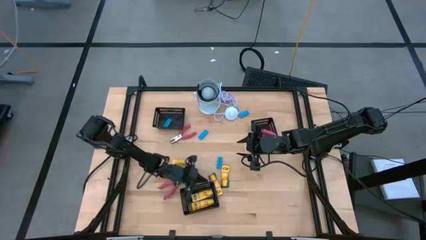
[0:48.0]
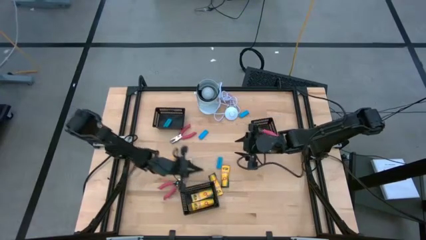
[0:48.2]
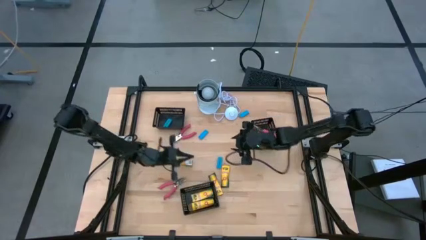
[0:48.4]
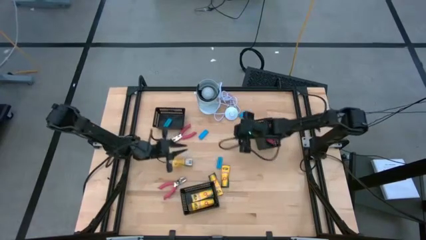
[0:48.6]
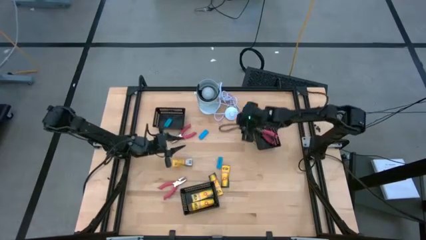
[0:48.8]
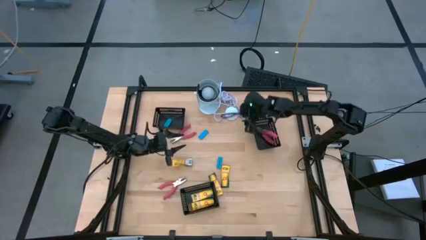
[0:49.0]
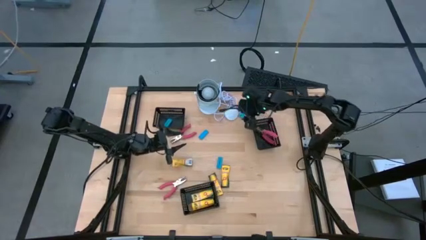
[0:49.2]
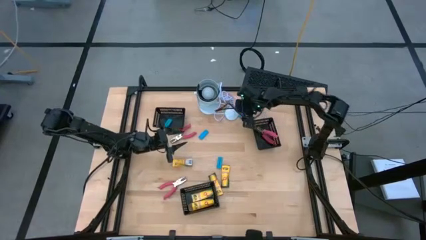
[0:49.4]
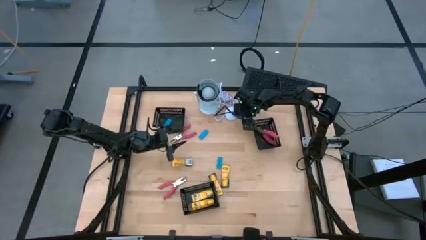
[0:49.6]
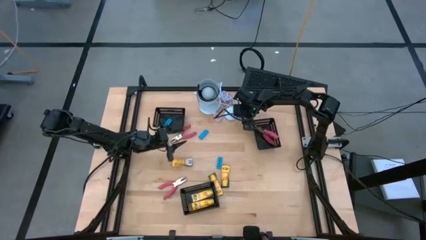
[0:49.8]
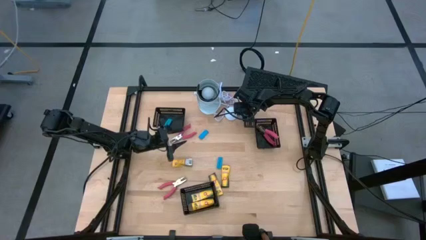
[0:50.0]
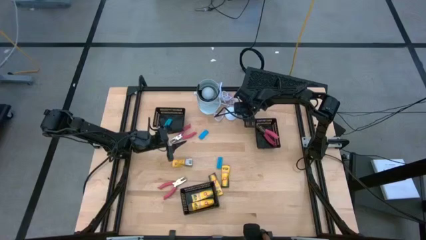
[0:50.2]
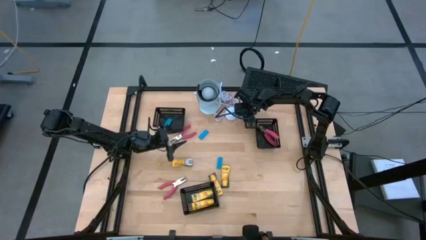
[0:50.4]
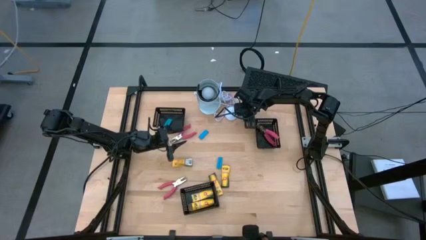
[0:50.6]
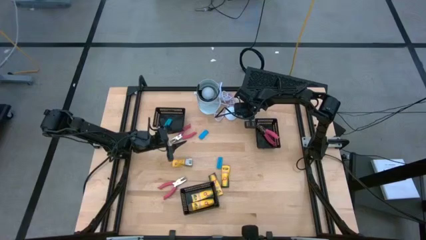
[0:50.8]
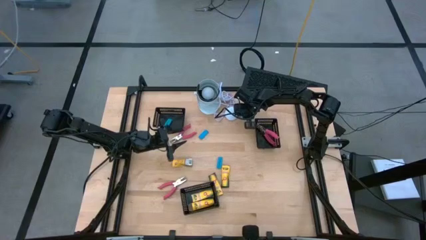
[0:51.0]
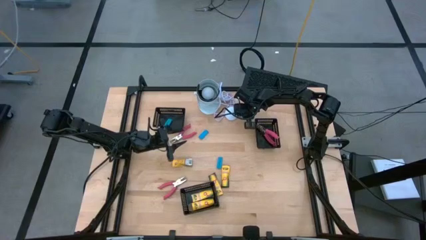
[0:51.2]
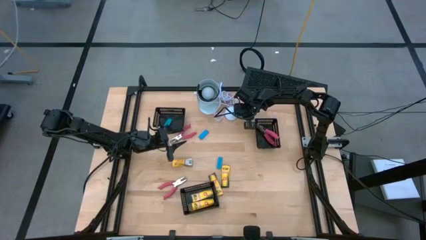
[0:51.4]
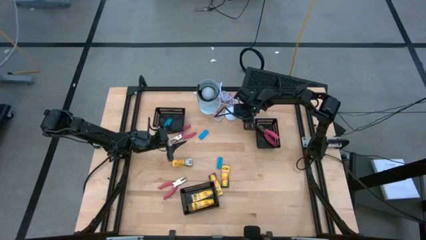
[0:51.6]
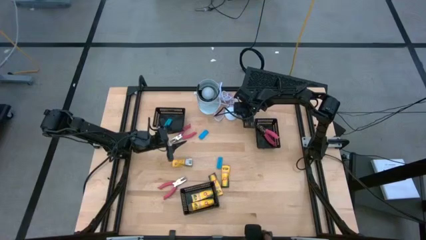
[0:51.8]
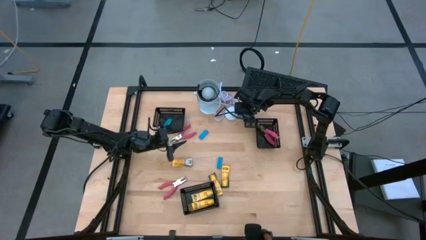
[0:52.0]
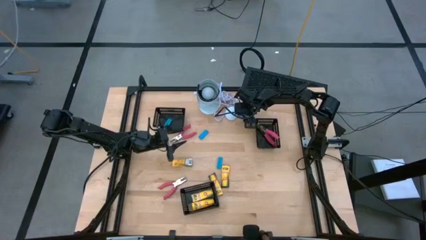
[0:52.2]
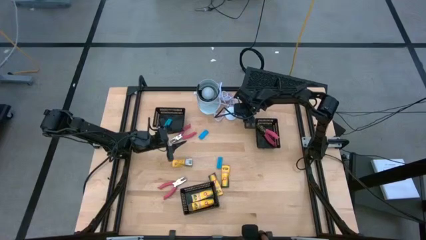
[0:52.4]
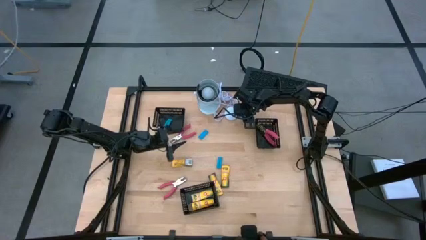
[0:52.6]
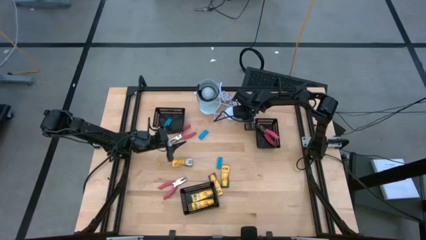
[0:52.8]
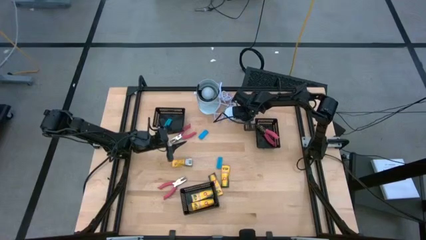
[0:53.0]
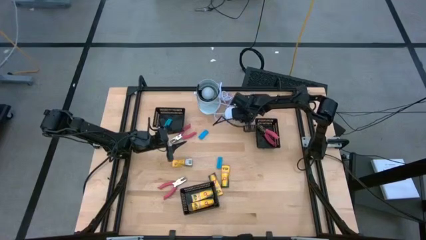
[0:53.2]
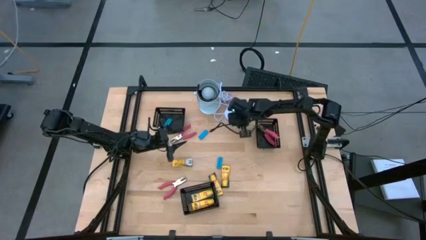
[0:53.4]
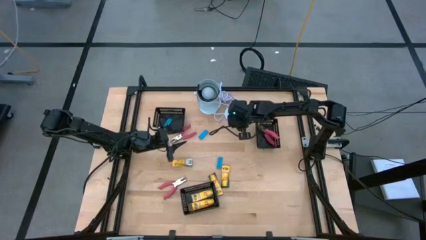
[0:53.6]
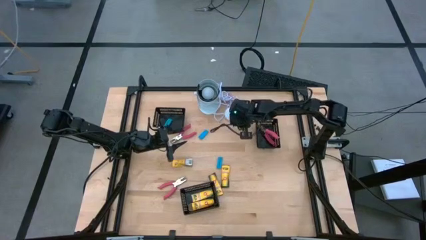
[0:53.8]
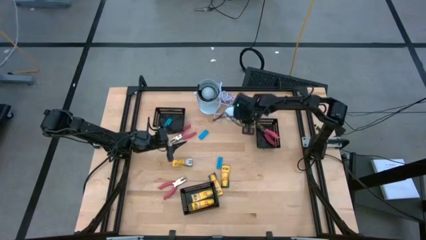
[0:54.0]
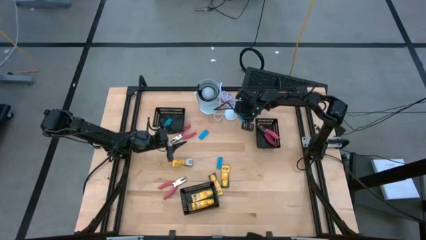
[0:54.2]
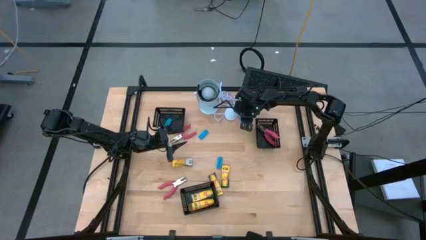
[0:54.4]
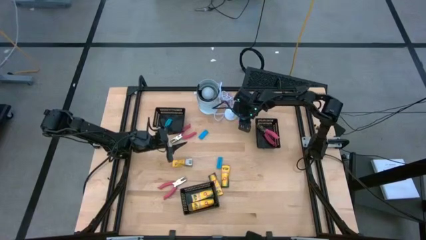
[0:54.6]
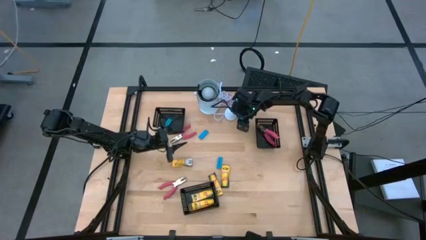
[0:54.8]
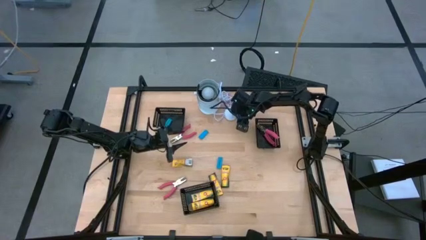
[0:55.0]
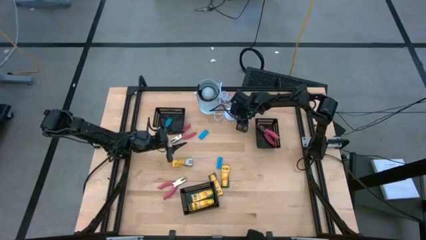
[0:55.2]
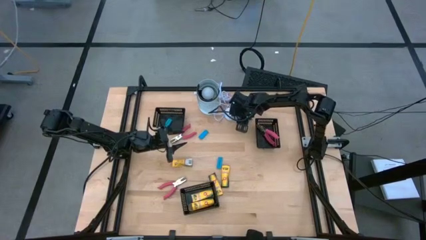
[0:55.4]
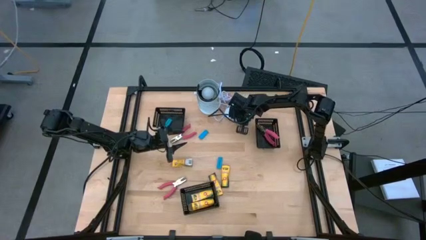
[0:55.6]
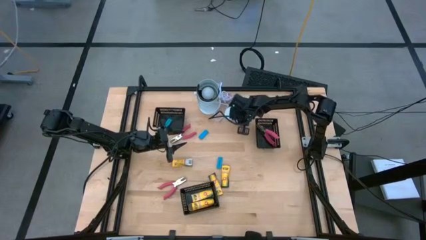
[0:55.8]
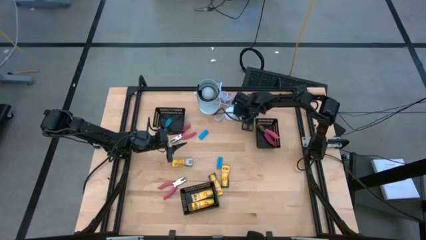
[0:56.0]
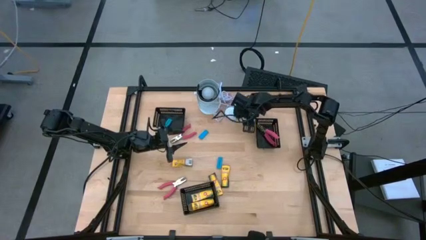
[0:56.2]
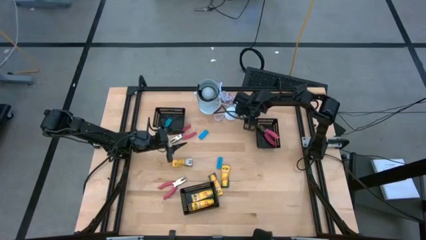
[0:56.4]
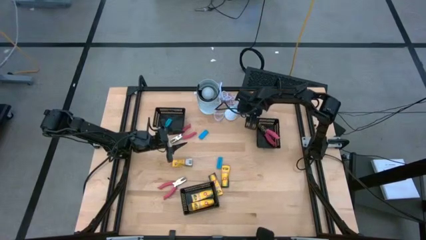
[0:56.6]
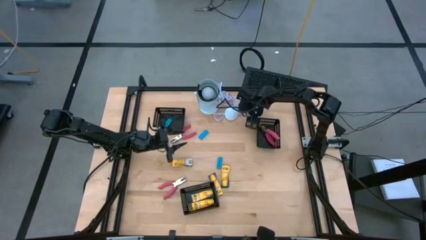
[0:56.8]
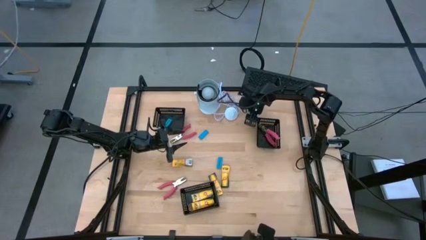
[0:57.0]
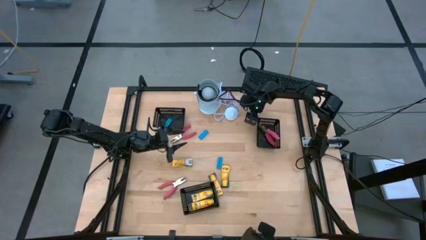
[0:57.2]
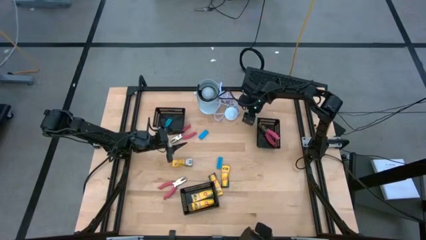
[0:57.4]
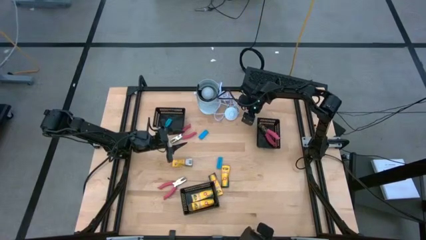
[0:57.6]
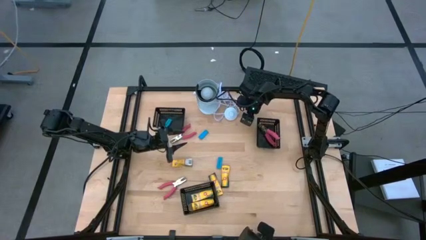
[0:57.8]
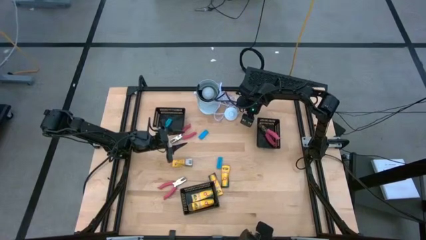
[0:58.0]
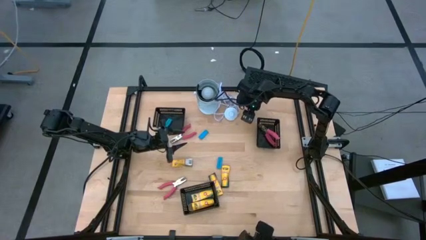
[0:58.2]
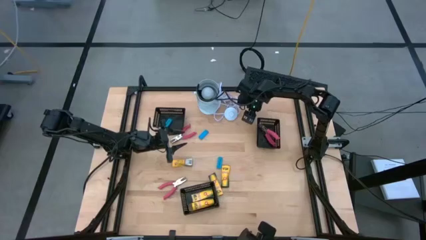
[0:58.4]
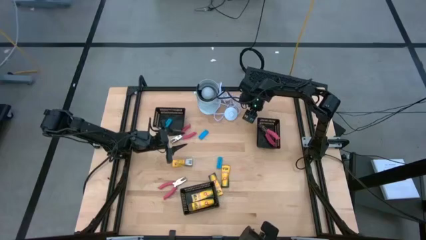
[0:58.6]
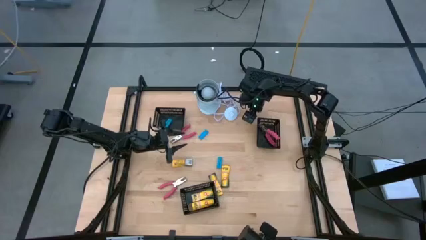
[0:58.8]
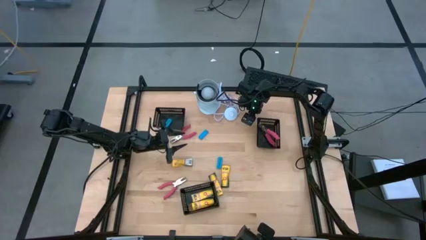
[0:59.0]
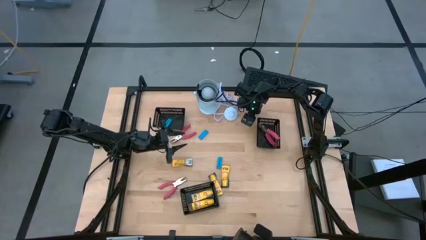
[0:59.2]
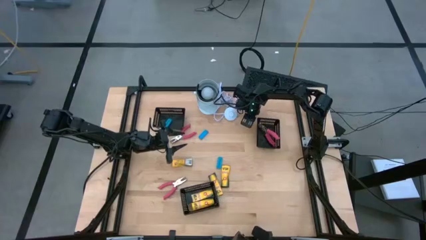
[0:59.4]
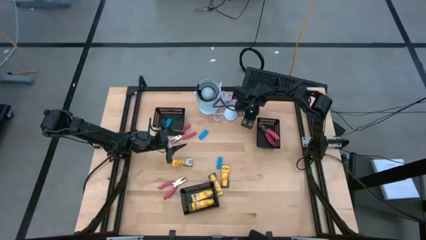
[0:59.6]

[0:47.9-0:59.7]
Task: Pick & Place School Supplies
Put the blue eraser into the top black bin

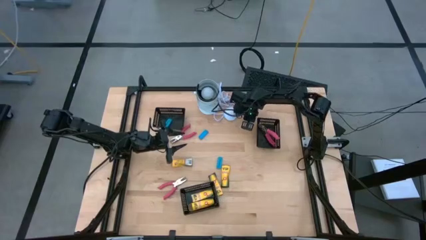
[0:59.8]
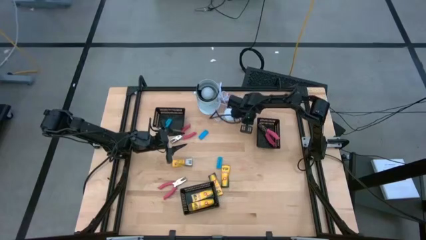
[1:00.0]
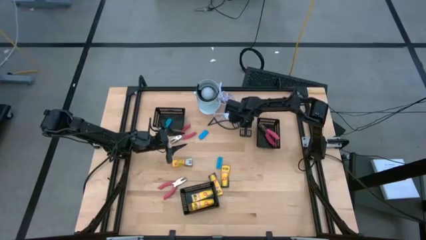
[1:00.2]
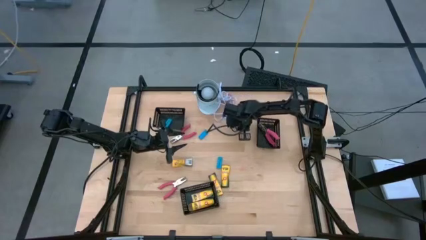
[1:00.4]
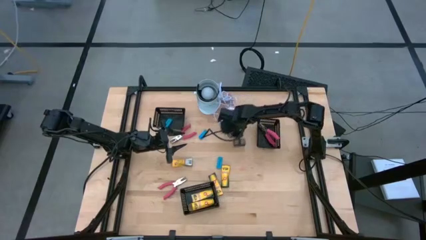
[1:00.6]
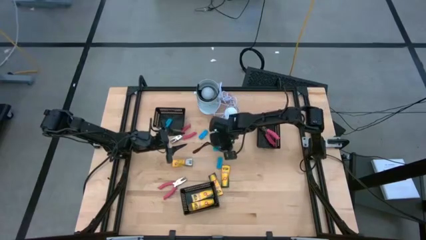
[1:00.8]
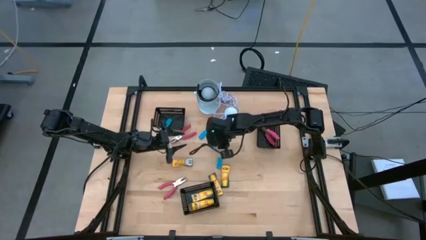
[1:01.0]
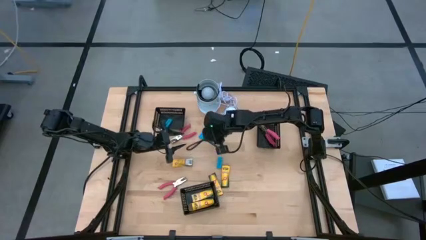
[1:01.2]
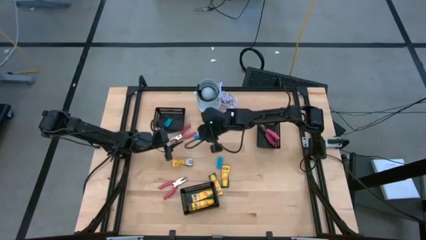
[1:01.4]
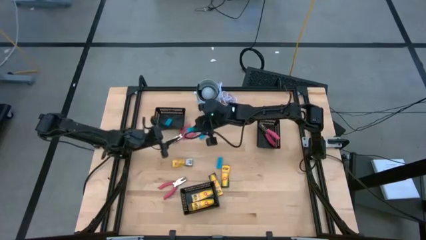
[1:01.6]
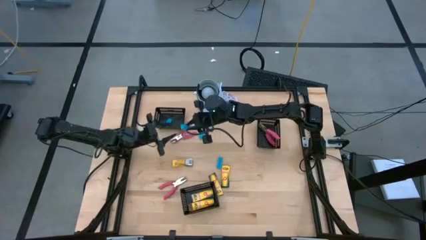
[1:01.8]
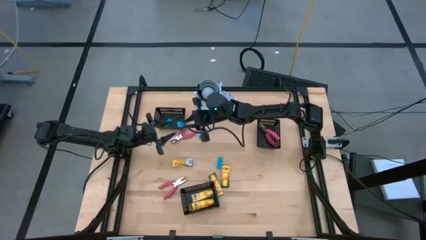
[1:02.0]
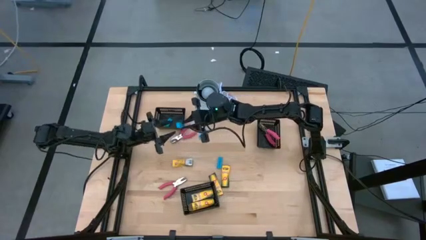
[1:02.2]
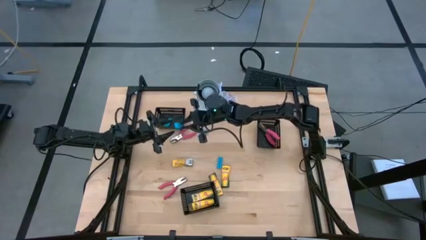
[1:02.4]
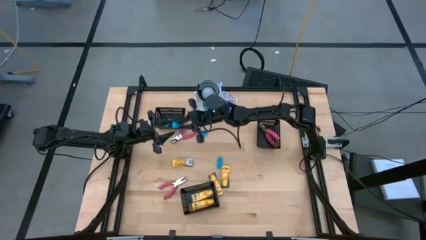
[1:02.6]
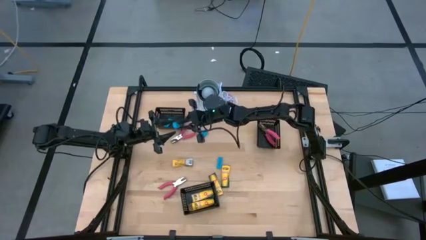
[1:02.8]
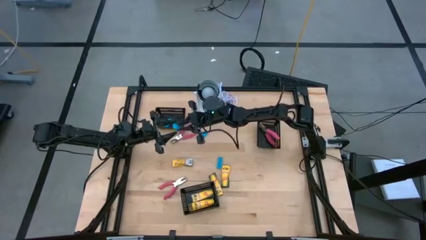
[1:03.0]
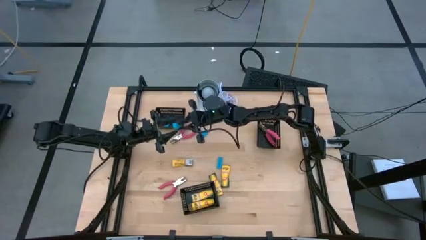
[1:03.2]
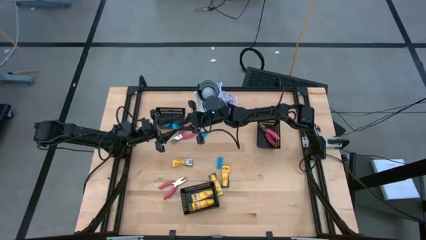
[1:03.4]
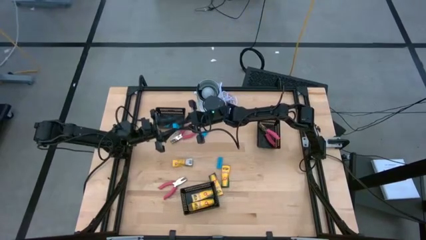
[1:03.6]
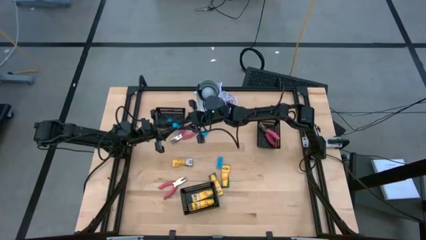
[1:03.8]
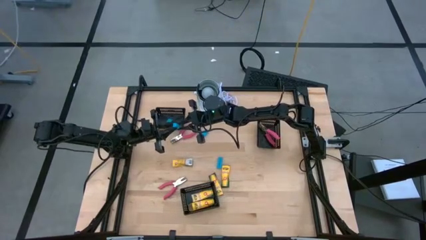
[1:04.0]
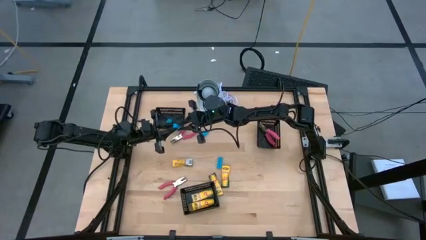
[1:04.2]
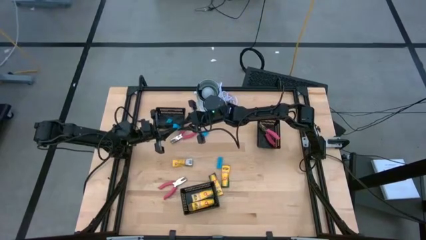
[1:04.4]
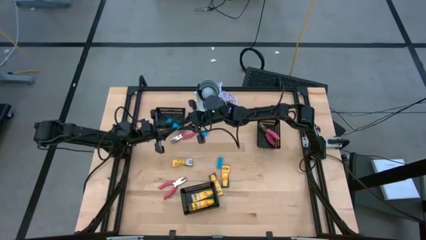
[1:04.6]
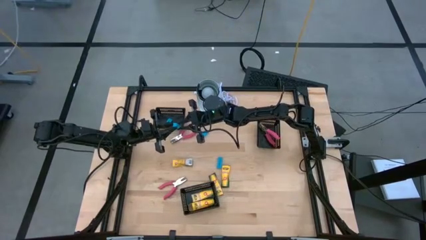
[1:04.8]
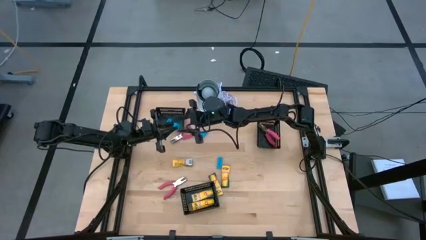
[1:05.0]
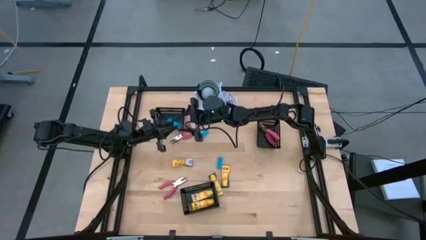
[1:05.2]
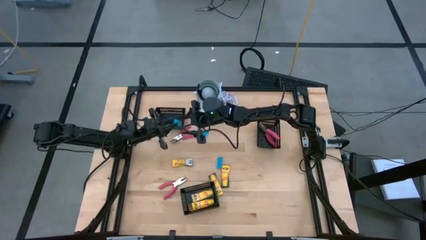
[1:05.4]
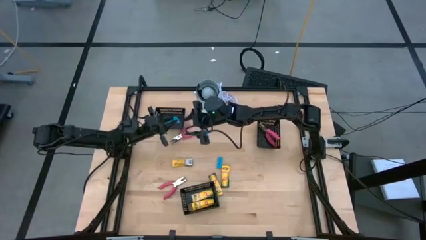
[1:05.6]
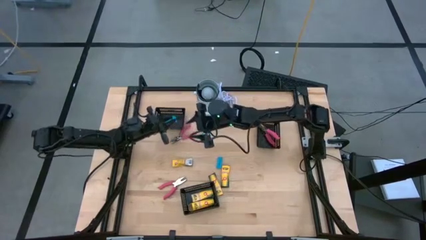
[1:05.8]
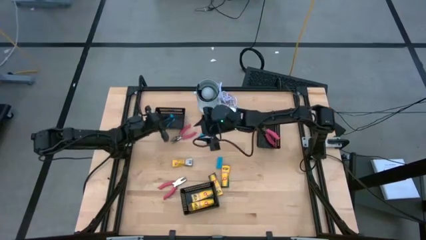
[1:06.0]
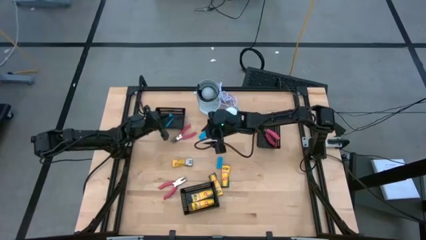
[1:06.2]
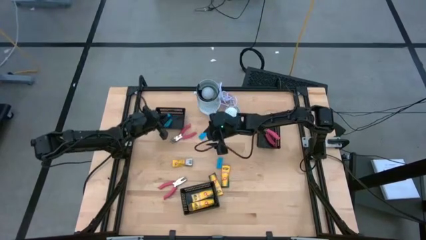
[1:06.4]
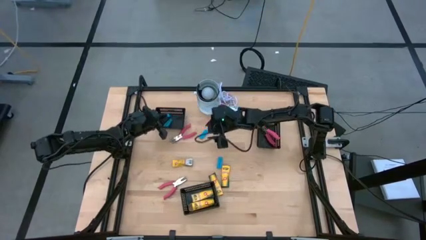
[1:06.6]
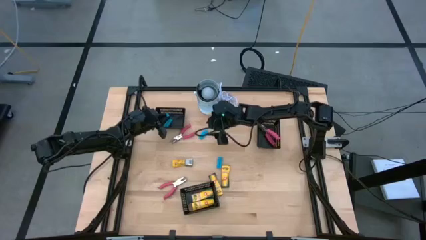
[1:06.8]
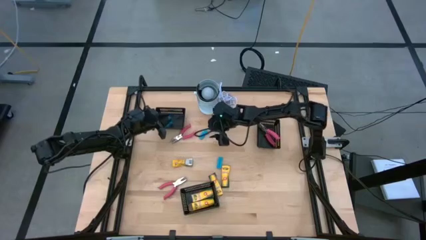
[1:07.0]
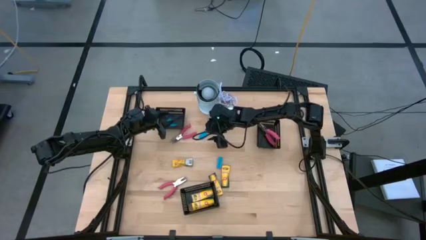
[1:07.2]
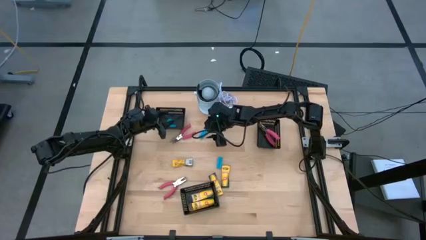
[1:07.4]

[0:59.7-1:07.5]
Put the blue eraser into the top black bin
